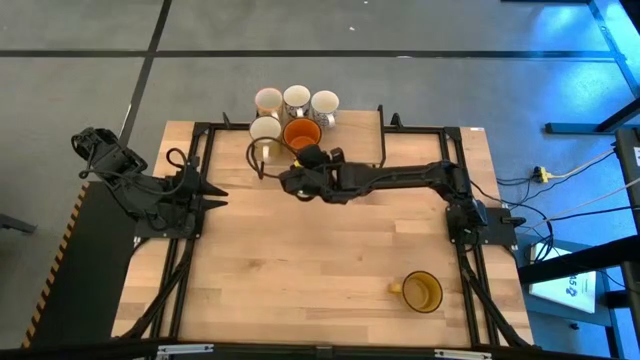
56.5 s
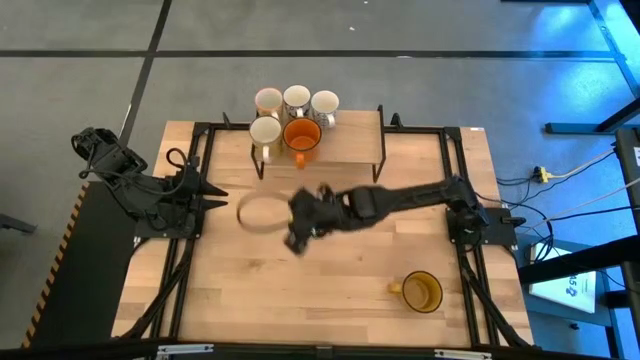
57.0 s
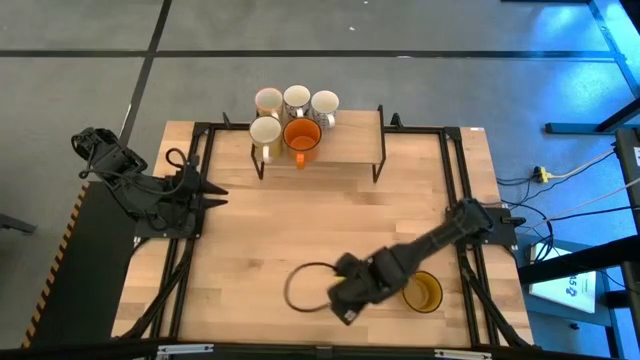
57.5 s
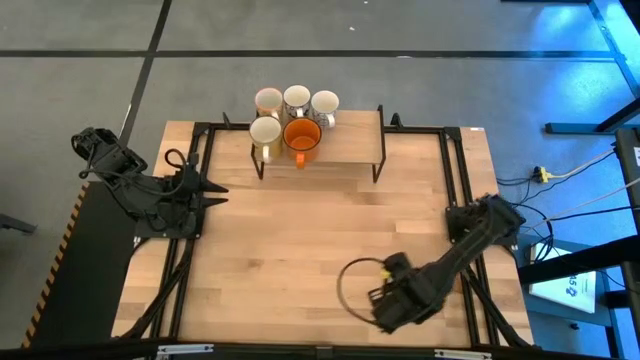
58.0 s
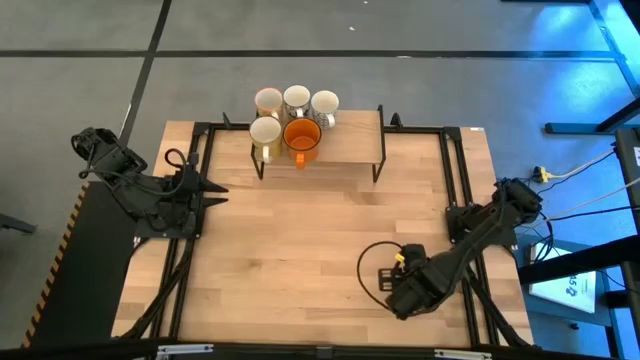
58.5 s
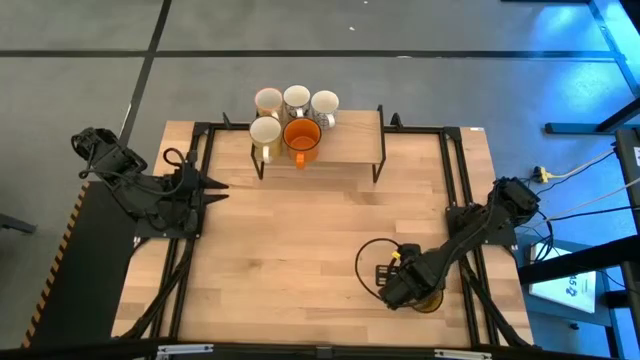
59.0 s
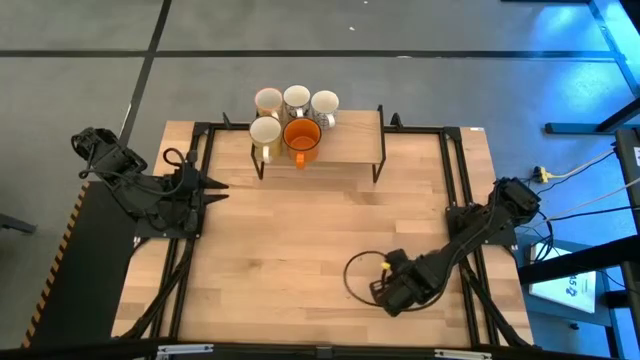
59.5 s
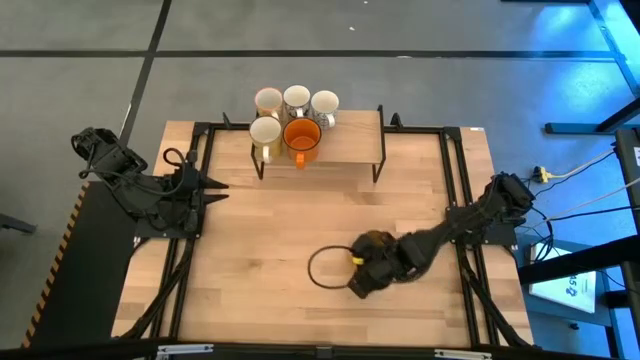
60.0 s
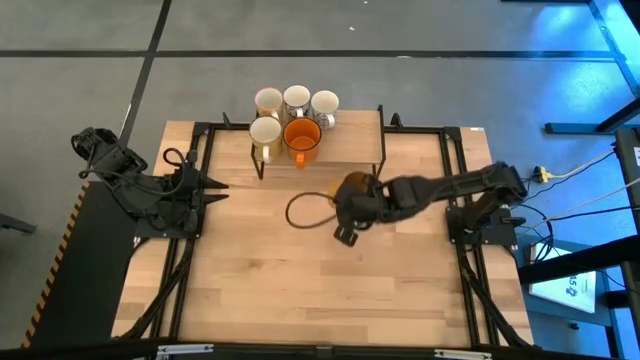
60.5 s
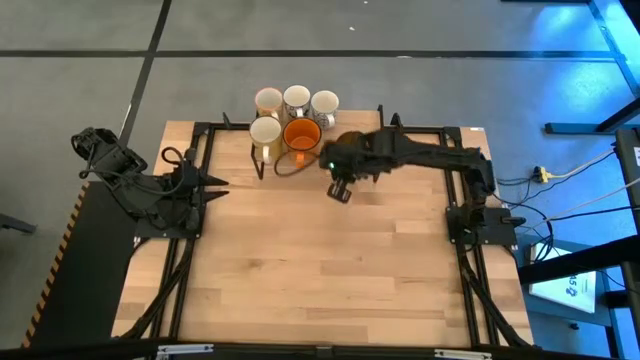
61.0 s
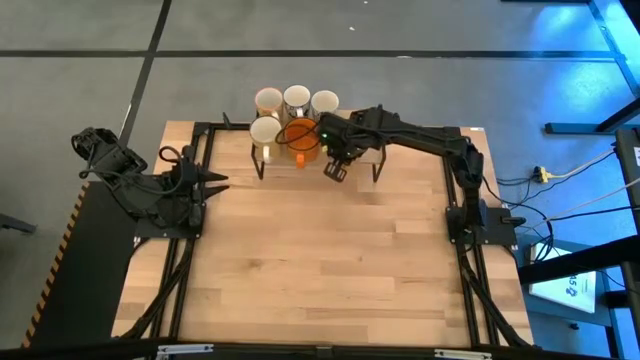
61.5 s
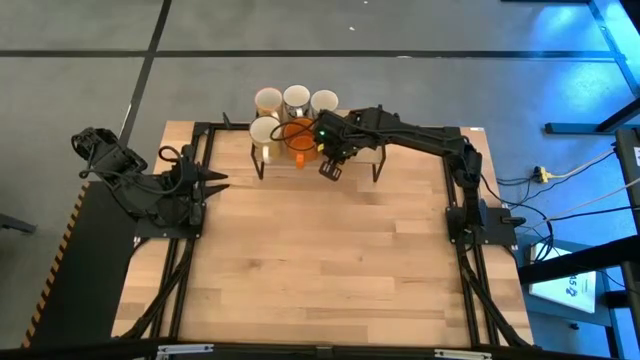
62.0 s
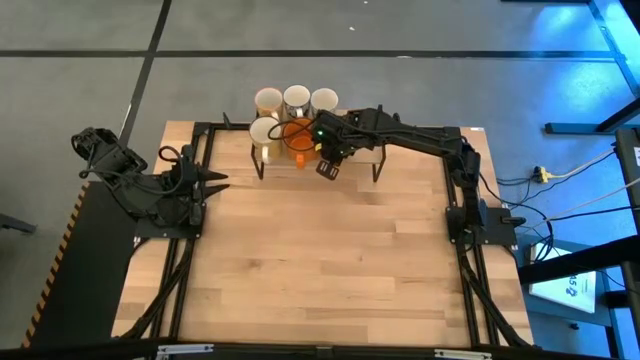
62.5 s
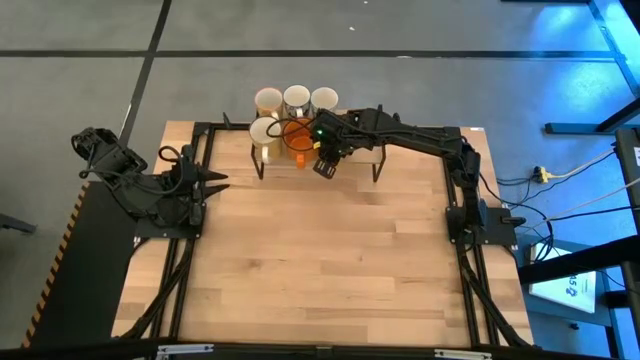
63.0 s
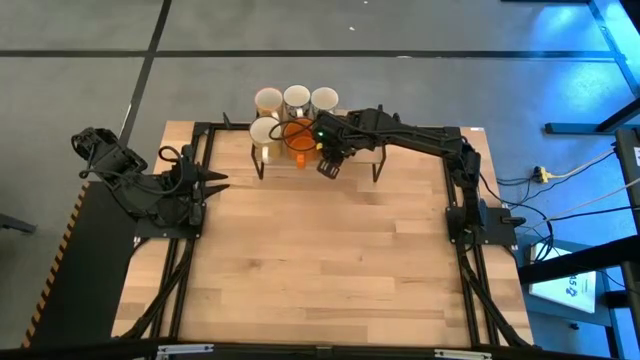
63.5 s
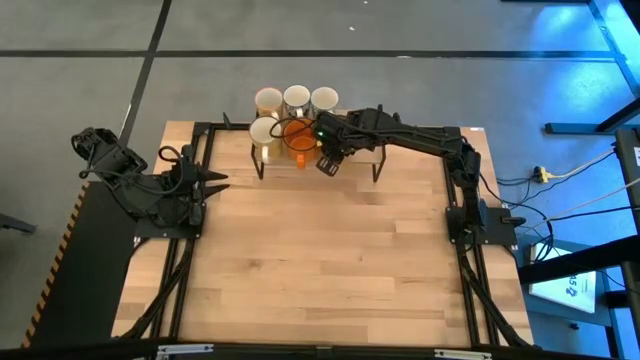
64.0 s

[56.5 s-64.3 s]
Task: Place coffee mugs
Put the dark yellow mug on the shelf

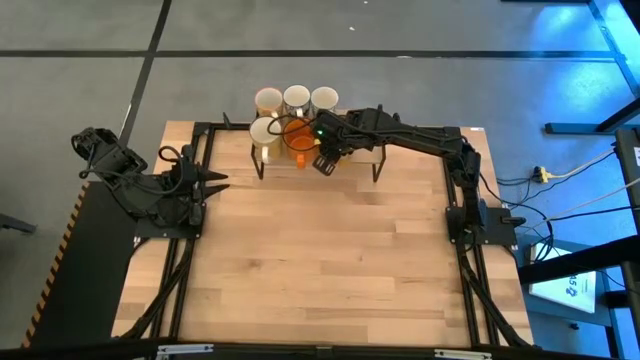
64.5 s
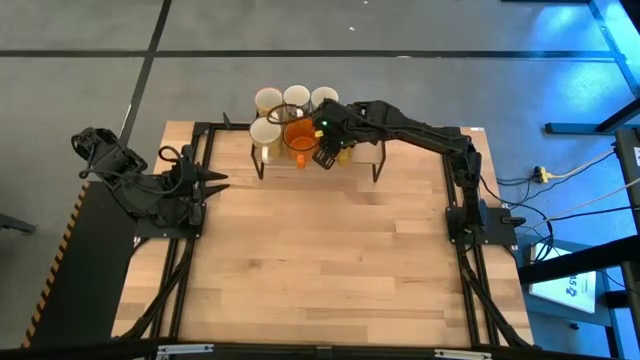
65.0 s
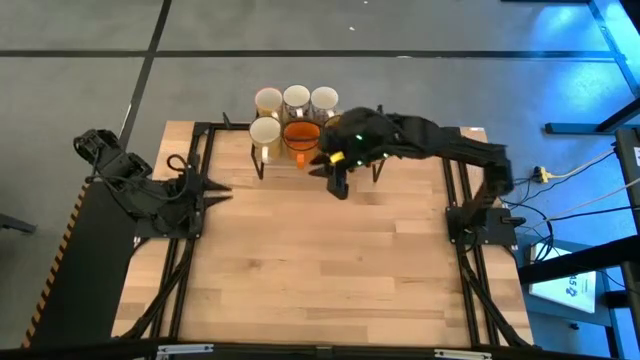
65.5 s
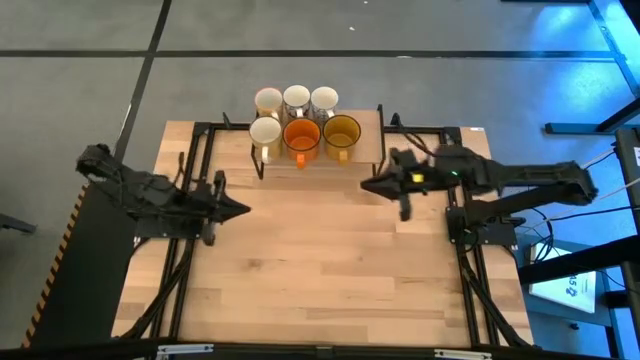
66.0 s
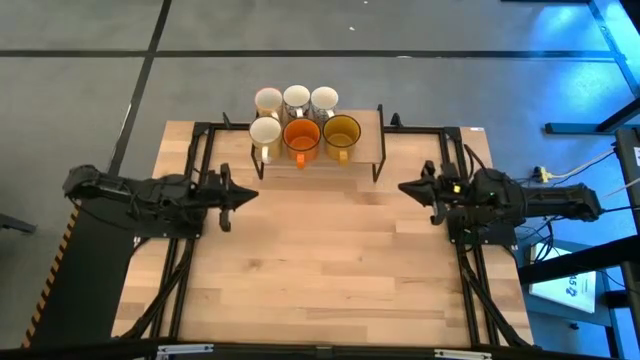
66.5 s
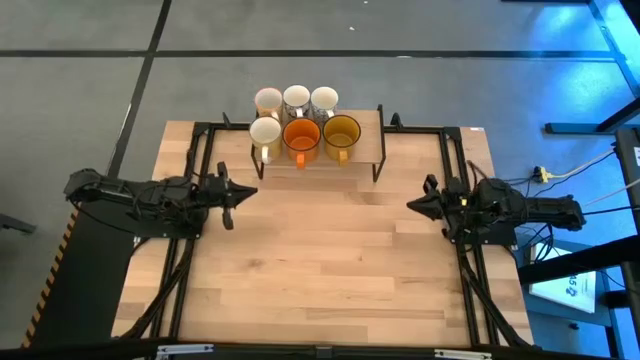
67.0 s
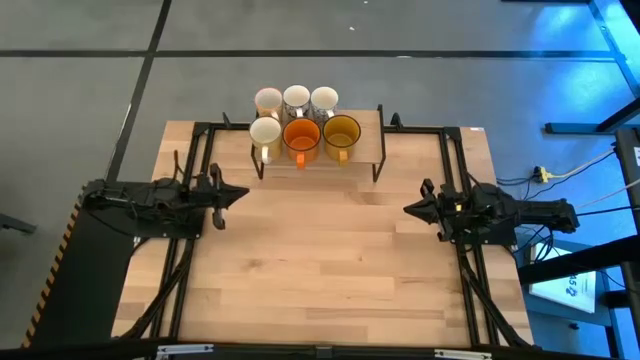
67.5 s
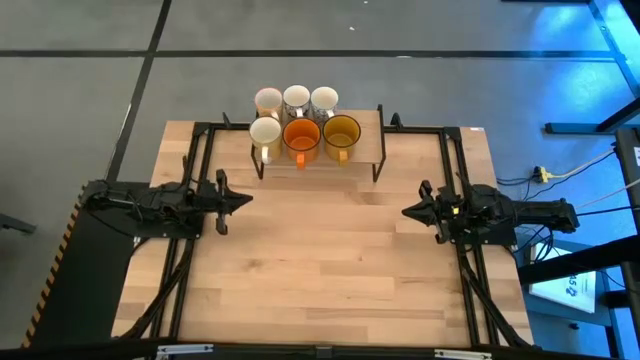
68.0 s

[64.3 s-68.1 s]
Return to Home Position

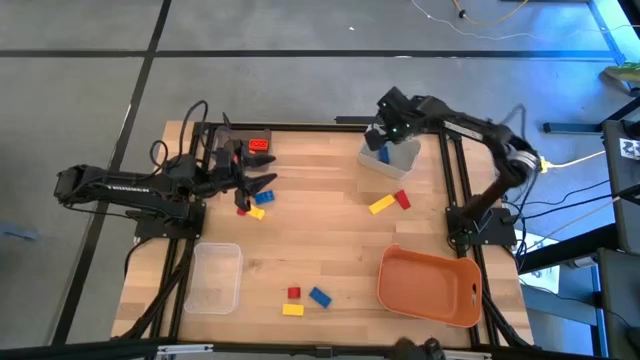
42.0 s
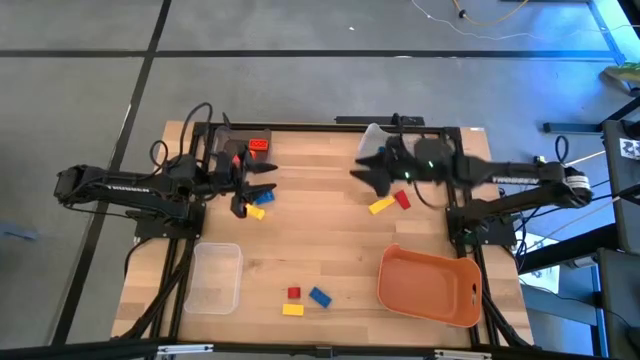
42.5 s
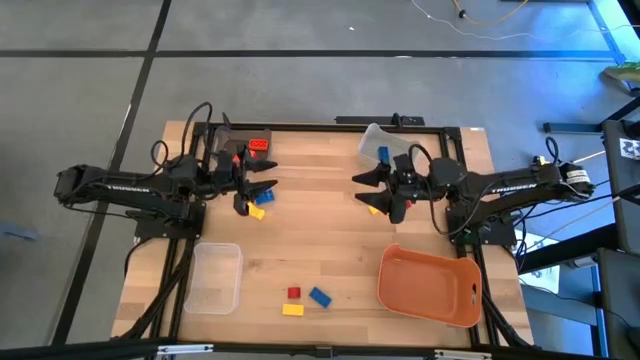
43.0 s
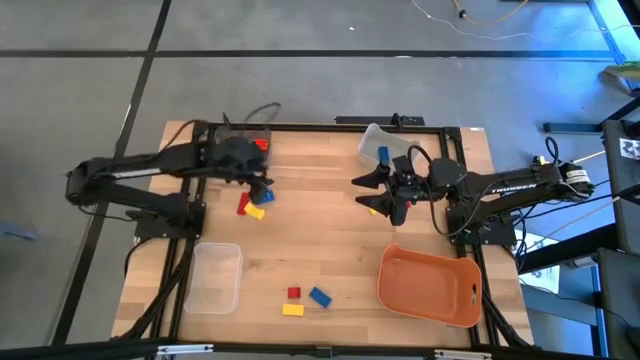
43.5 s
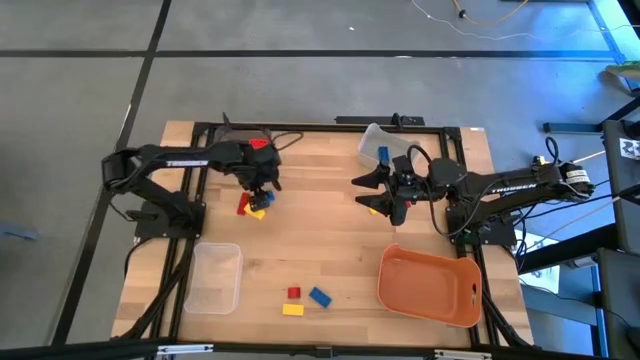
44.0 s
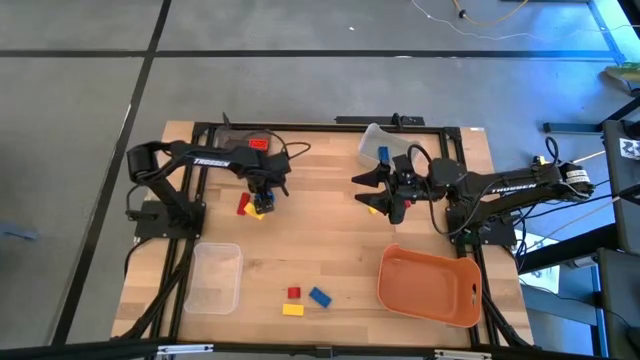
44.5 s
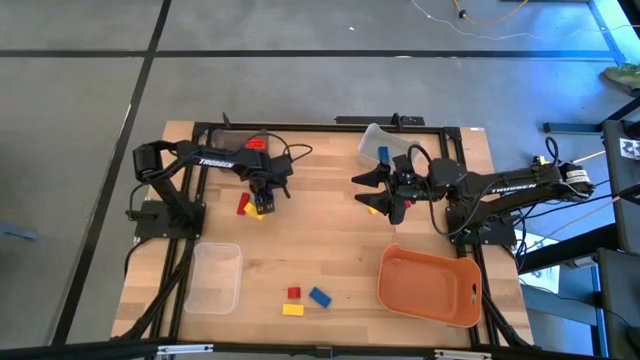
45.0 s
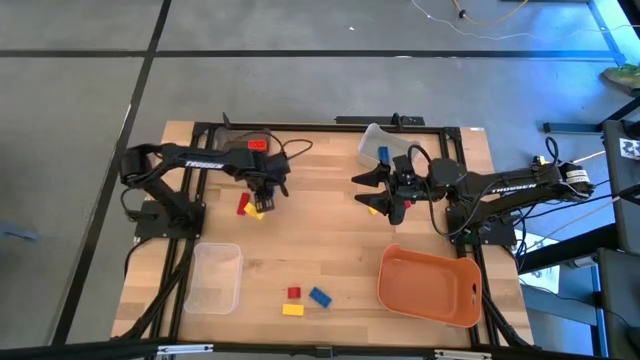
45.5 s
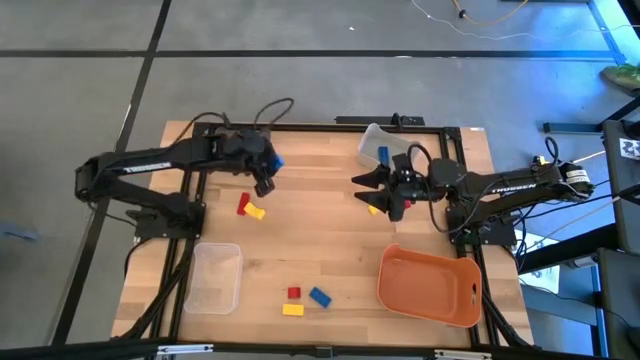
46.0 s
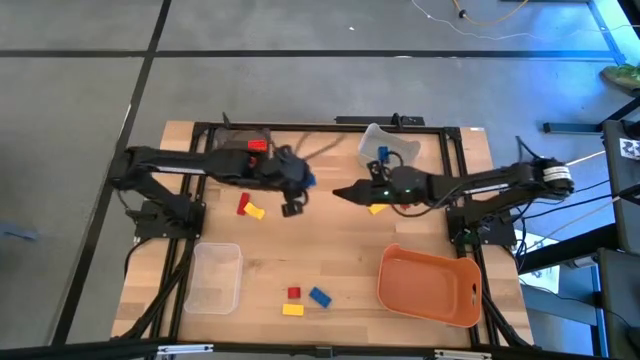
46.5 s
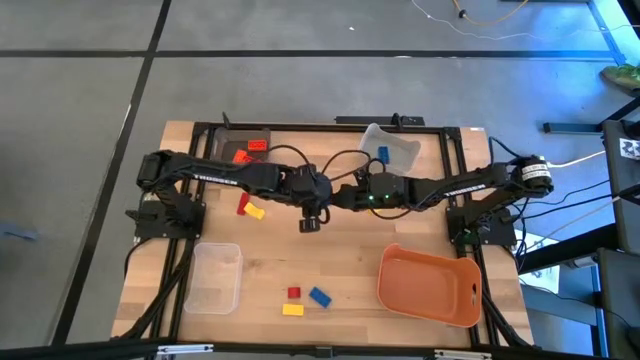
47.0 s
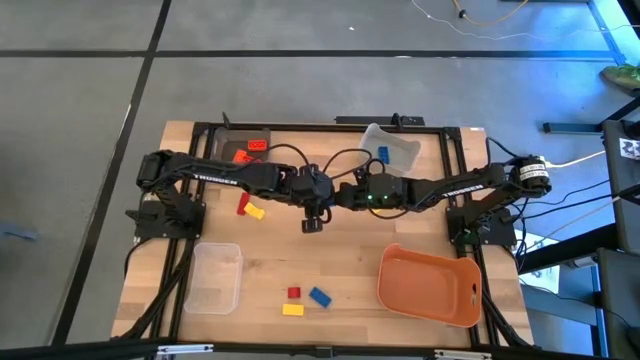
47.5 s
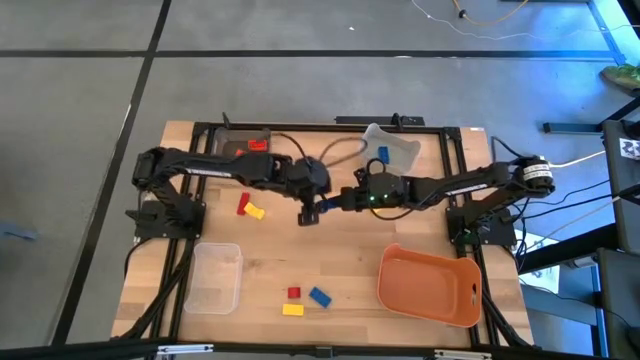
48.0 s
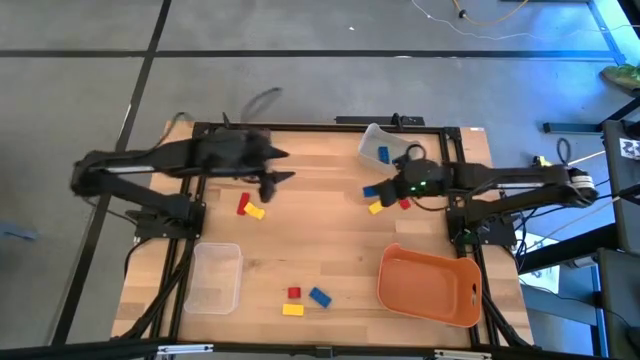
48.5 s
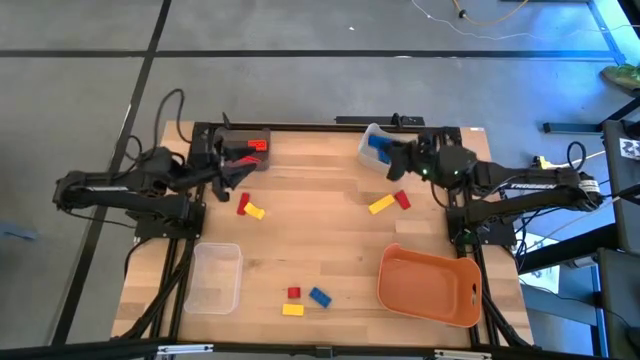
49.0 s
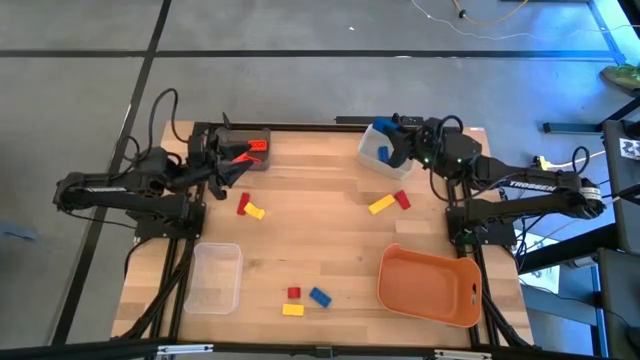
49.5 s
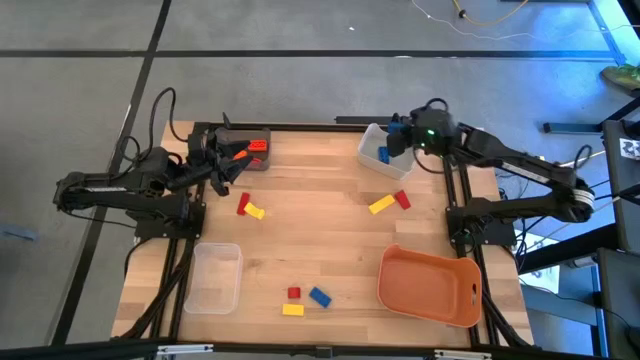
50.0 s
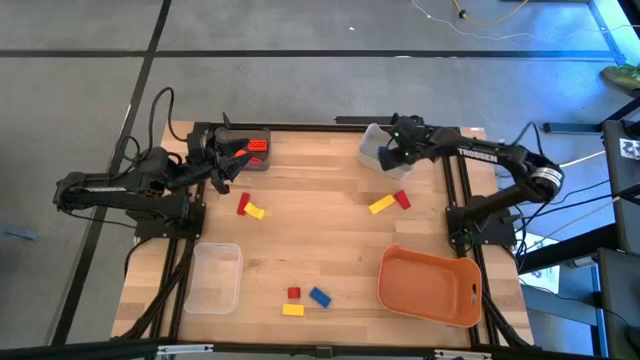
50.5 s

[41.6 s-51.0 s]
Task: Sort & place blocks by color
Put the top blue gamepiece into the gray bin
